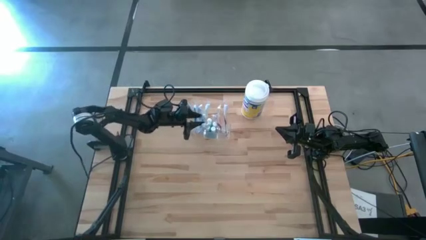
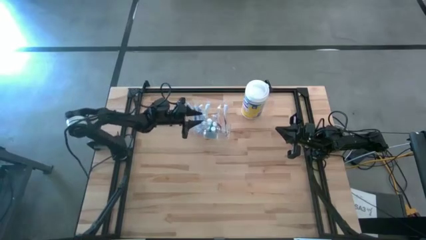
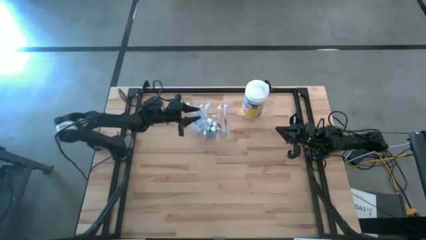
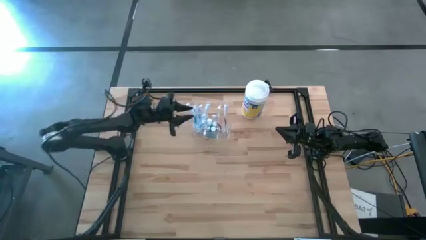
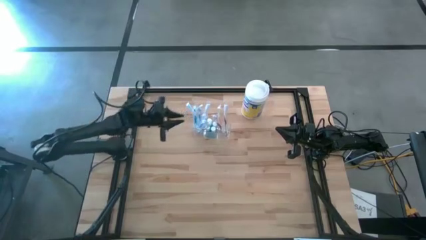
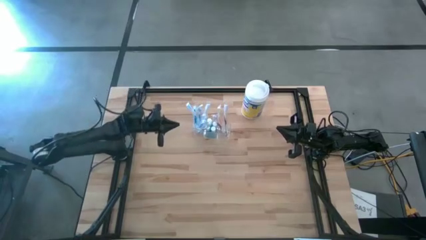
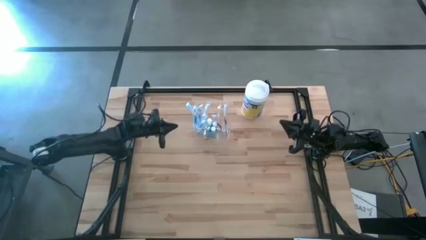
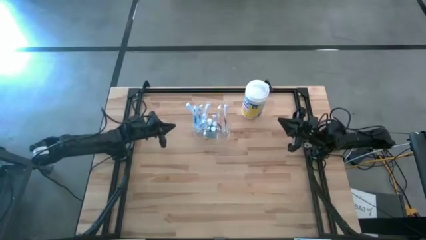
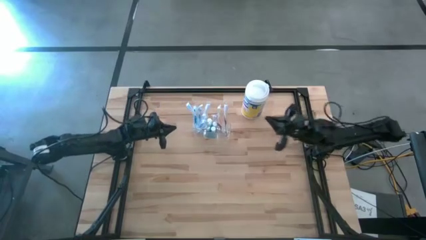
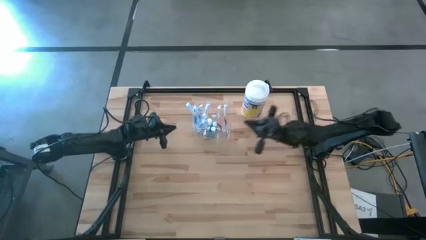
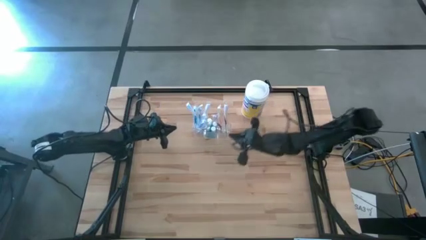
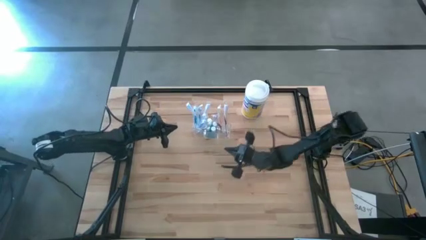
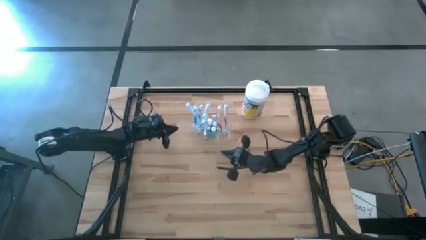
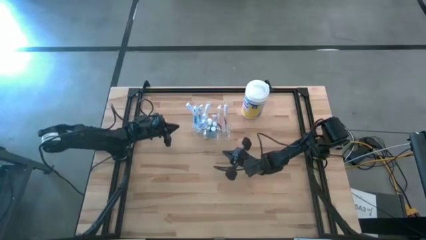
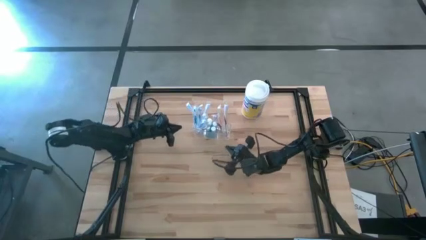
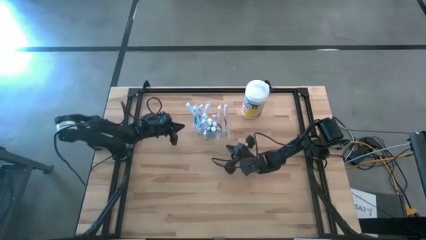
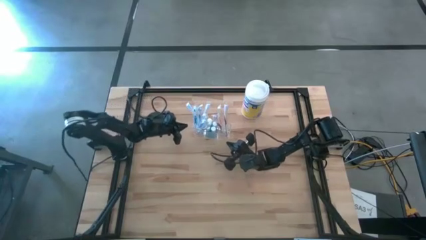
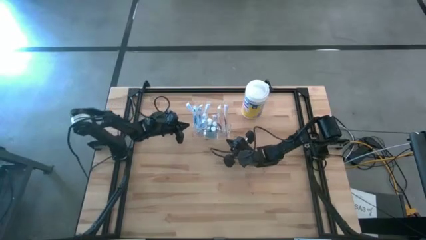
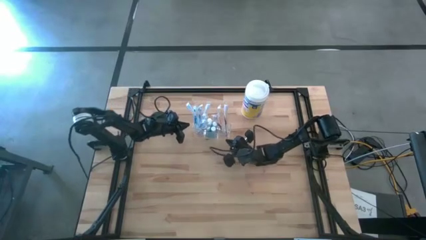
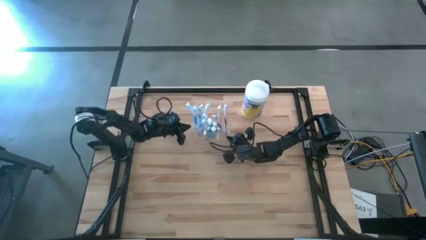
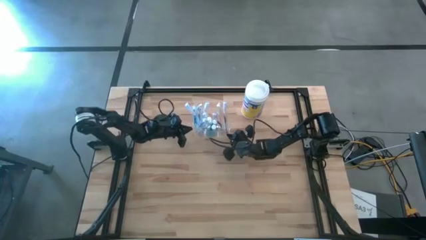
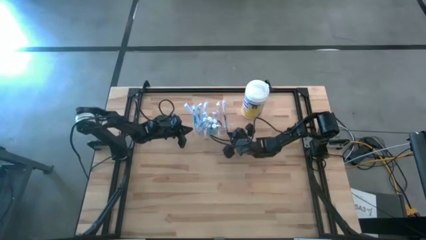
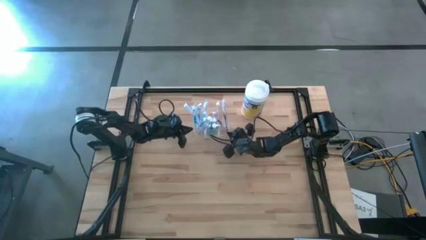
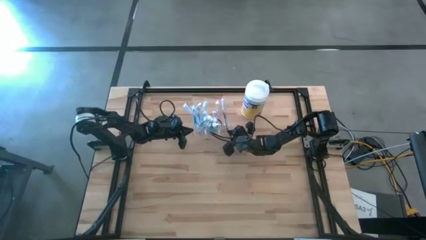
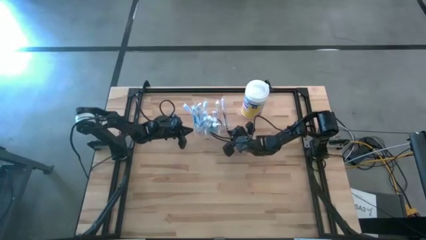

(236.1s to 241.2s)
Task: Pick & Place toothbrushing station
Adjust the transparent organizer

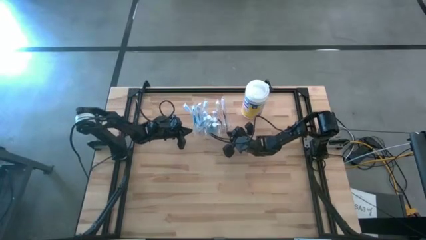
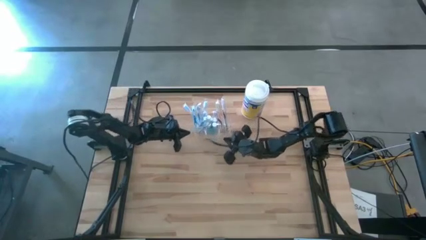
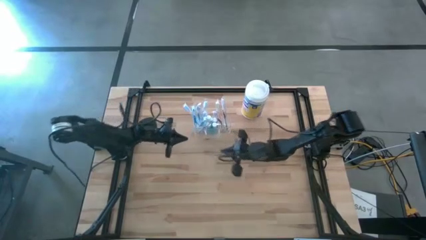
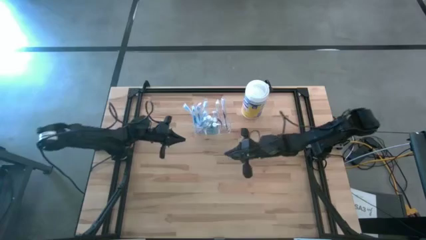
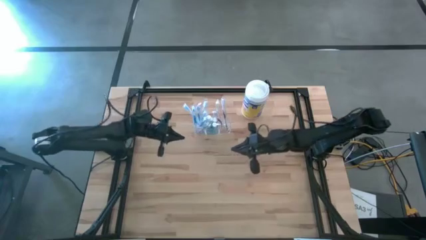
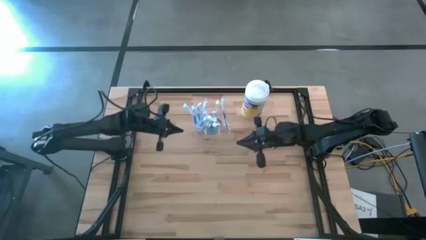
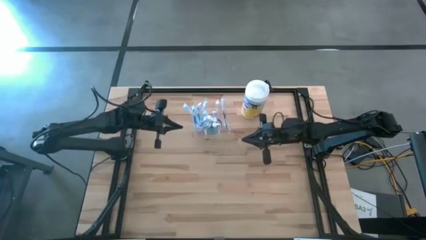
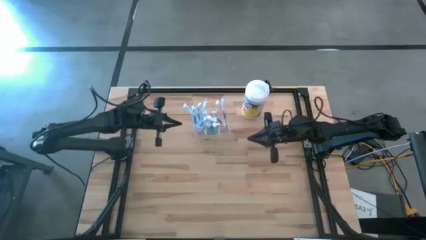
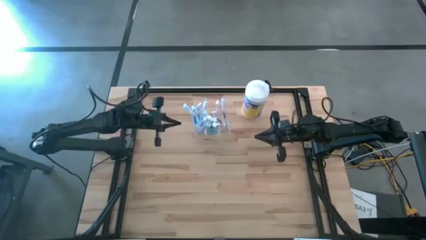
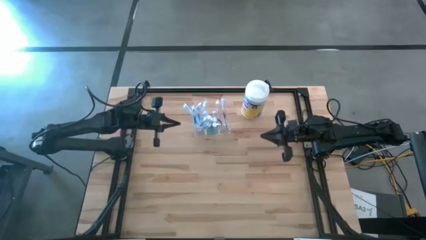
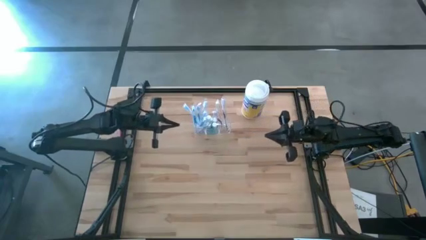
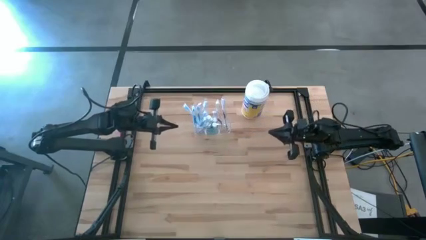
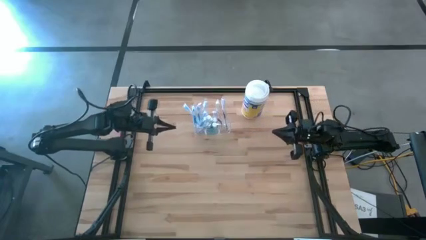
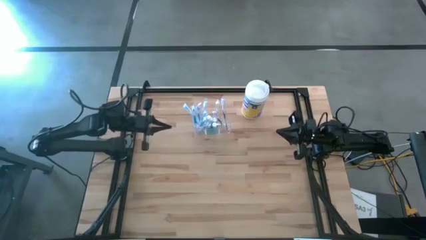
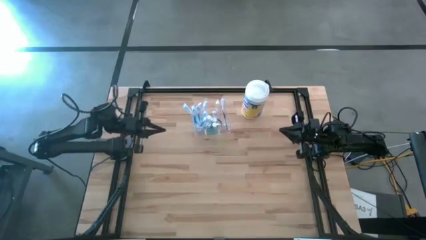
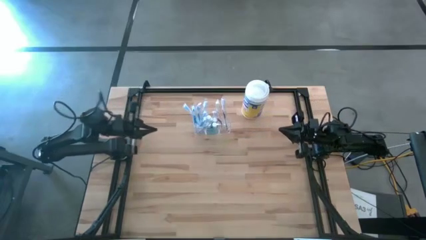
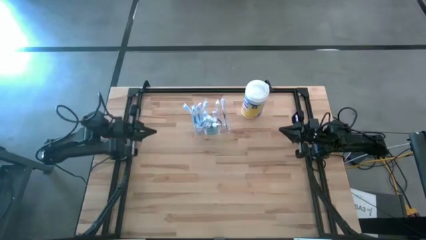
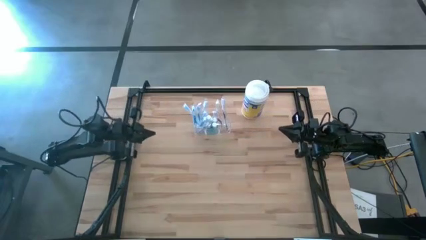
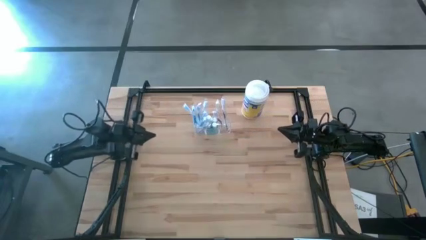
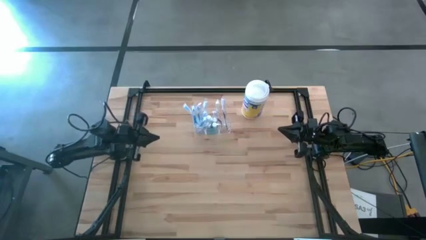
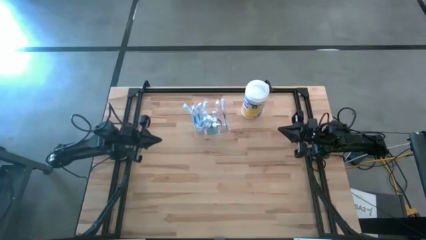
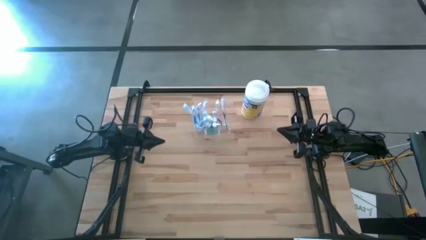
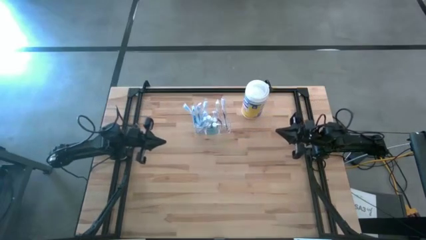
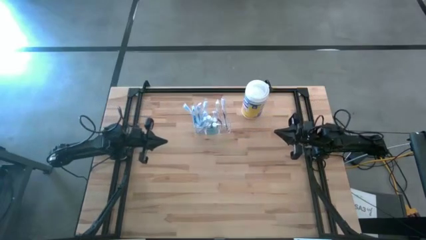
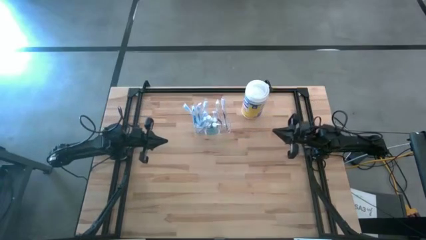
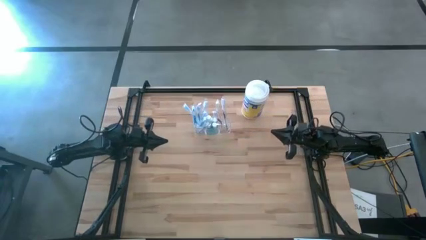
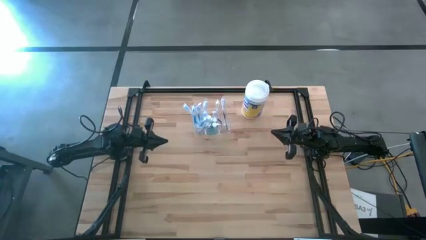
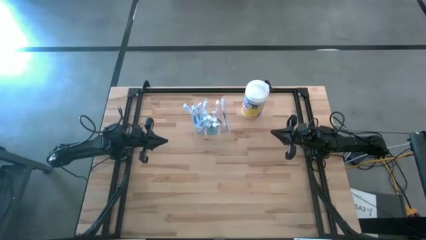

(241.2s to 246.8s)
Return to Home Position
